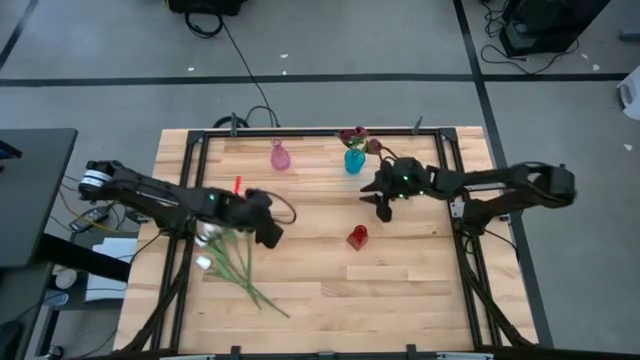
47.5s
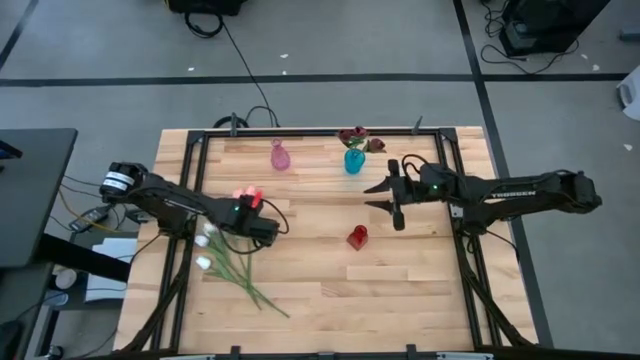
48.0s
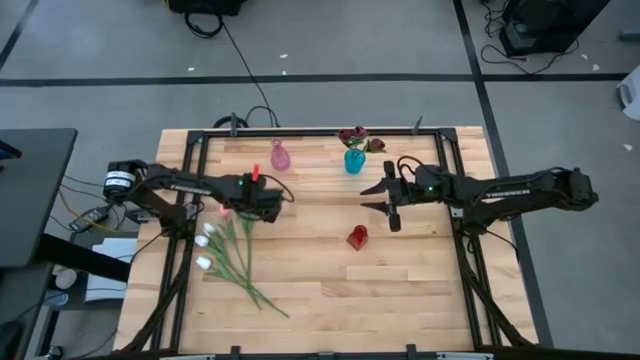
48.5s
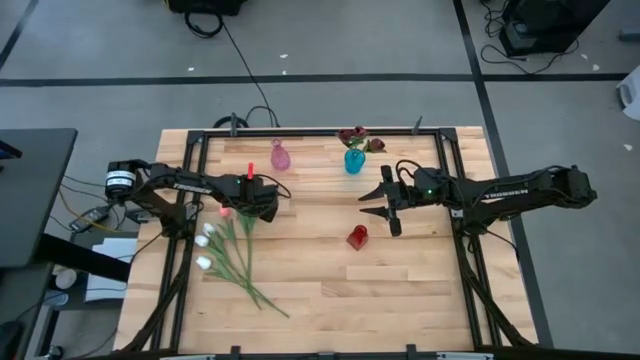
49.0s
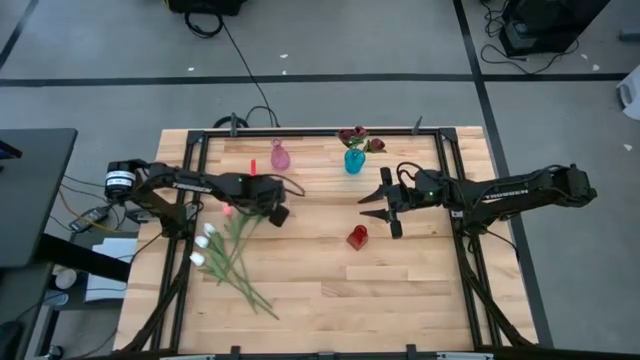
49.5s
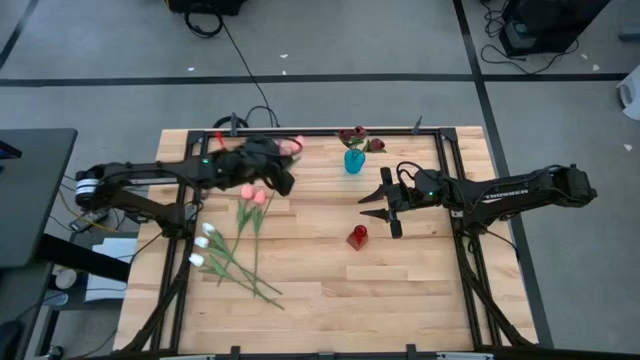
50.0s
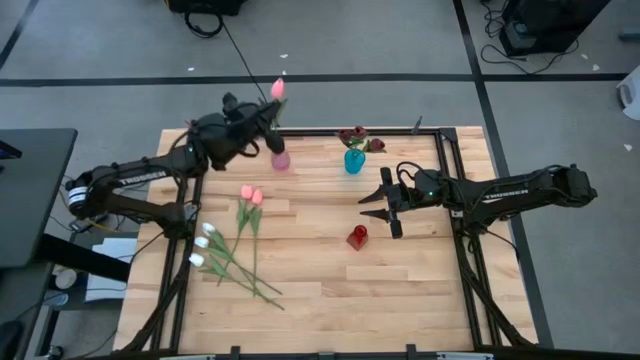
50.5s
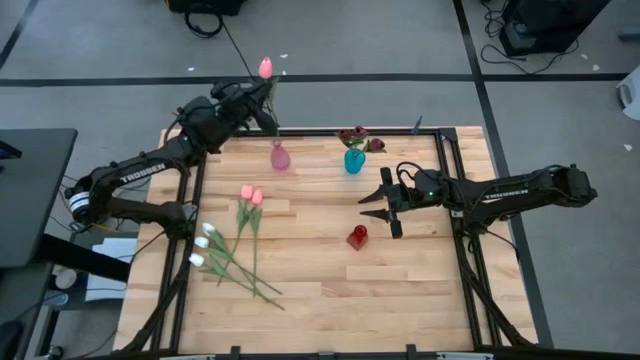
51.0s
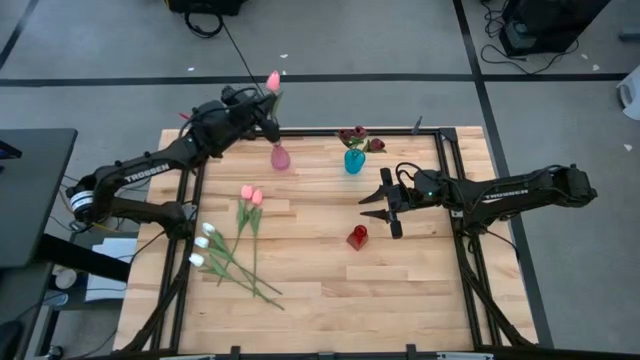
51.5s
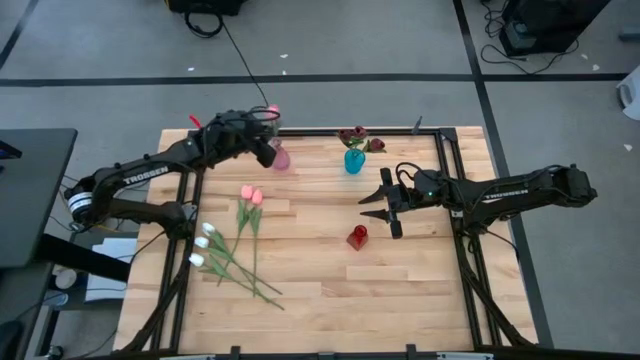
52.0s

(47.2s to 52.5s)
Task: Sort flowers into vase by color
Put the right pink tulip into the purple vase

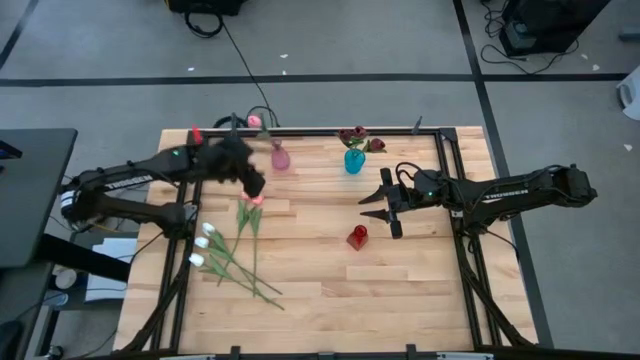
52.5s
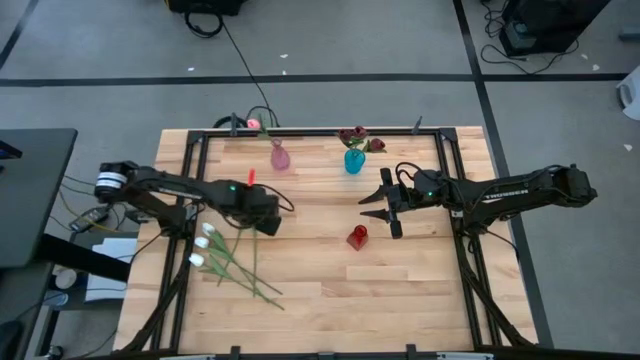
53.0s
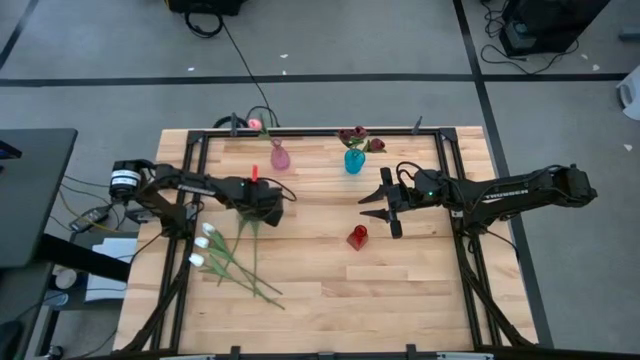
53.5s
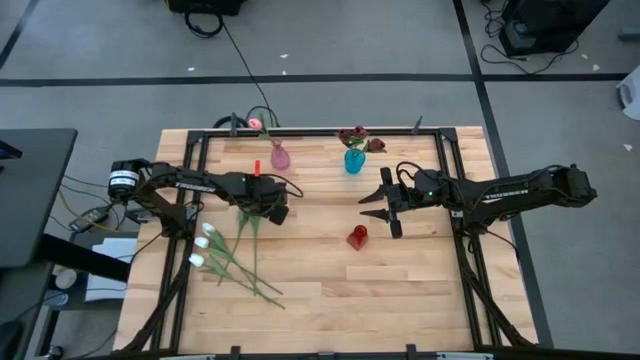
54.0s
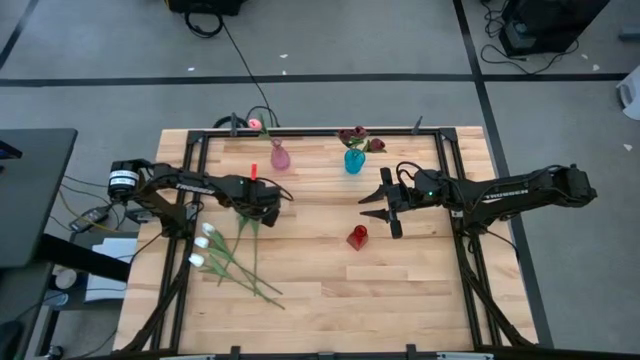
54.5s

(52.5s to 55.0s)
Put the right pink tulip into the purple vase

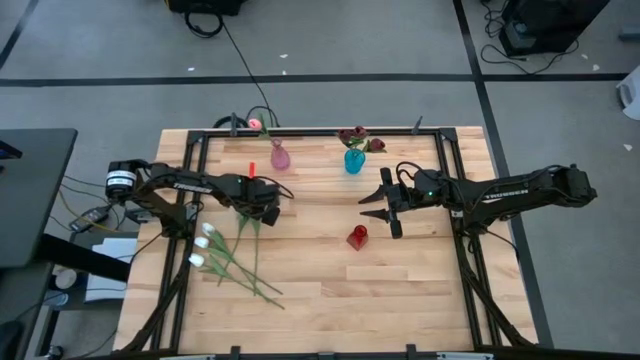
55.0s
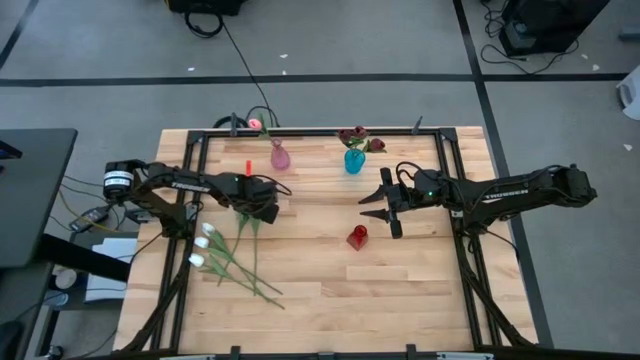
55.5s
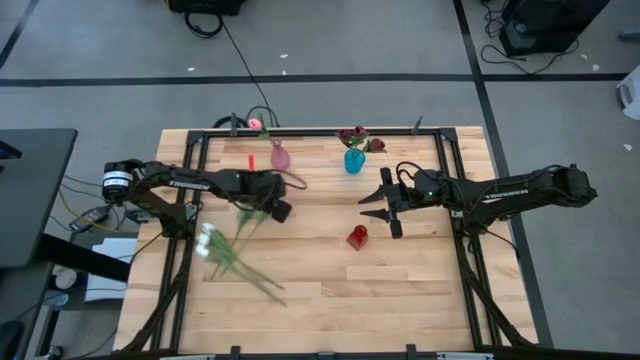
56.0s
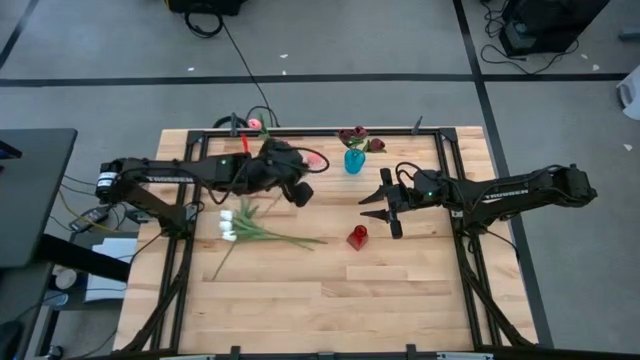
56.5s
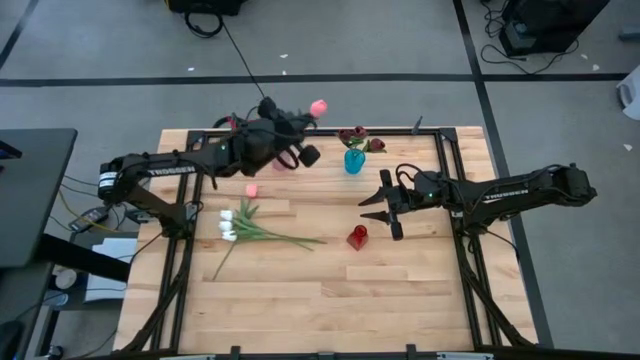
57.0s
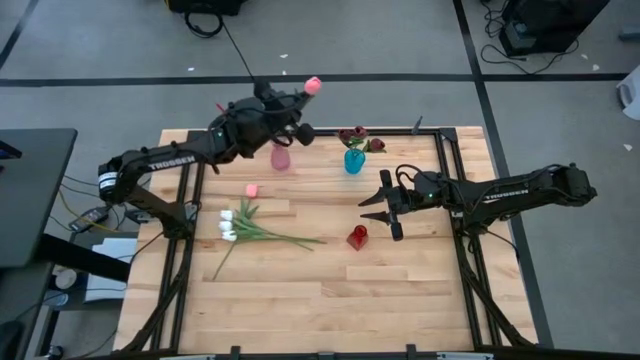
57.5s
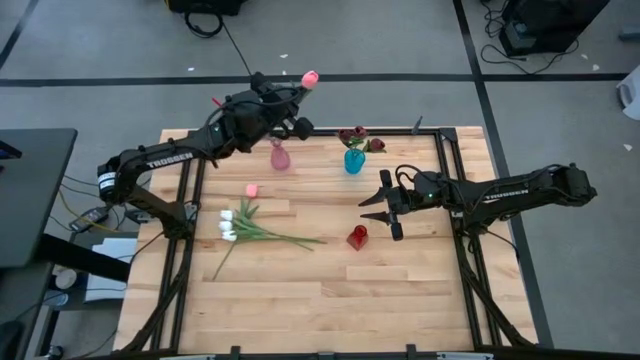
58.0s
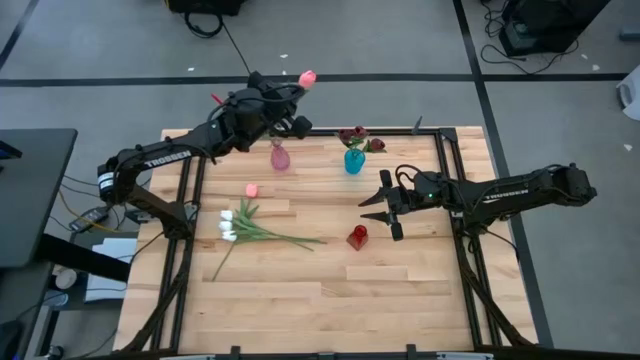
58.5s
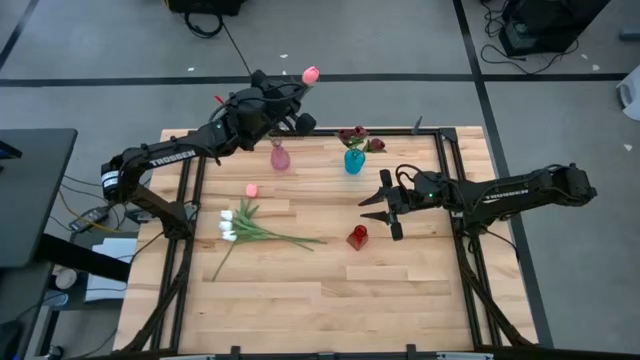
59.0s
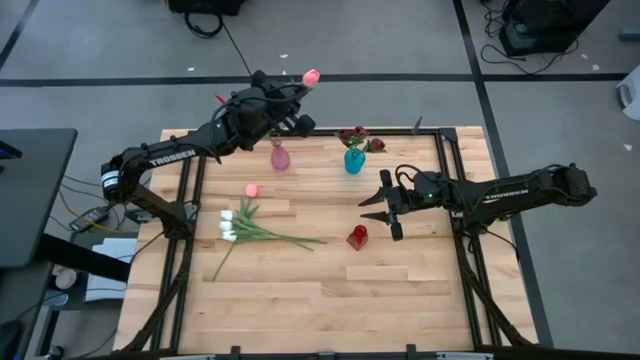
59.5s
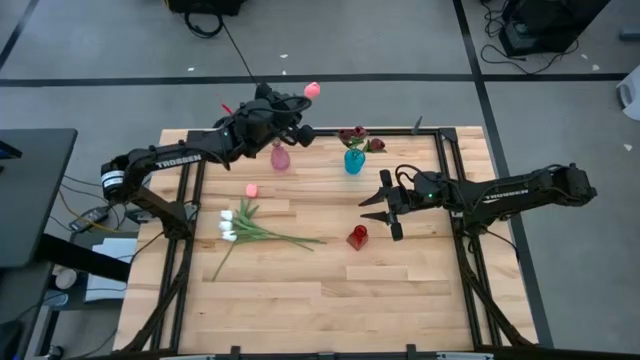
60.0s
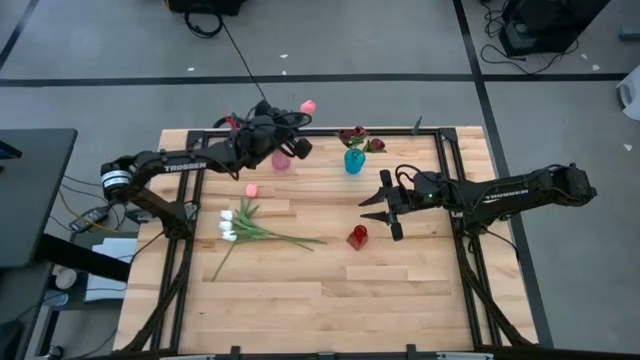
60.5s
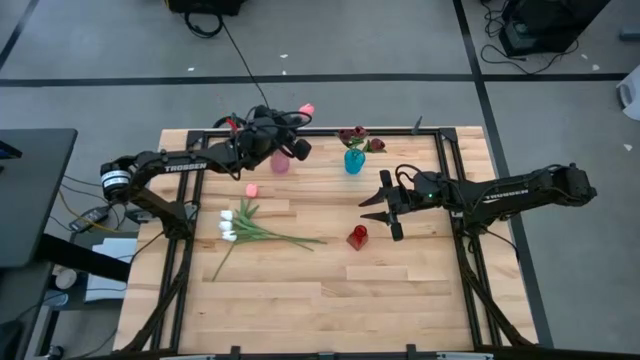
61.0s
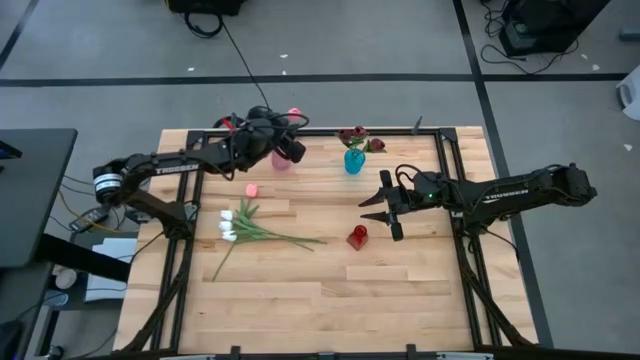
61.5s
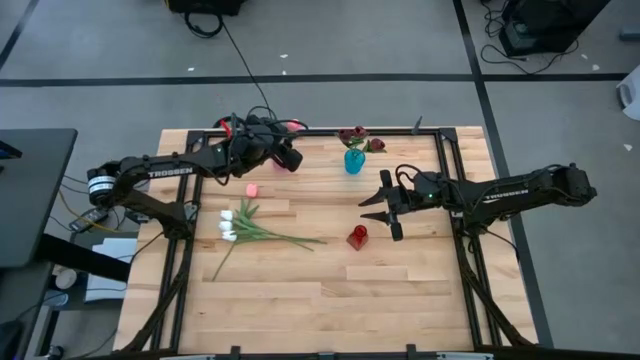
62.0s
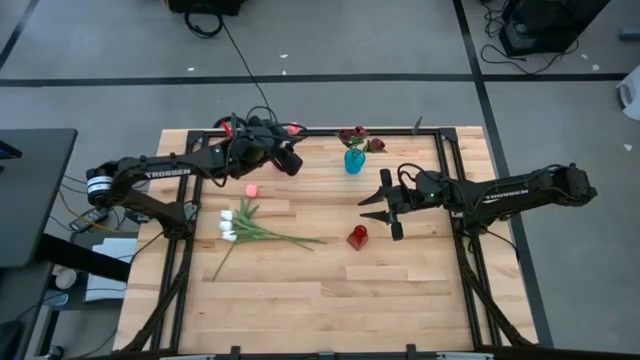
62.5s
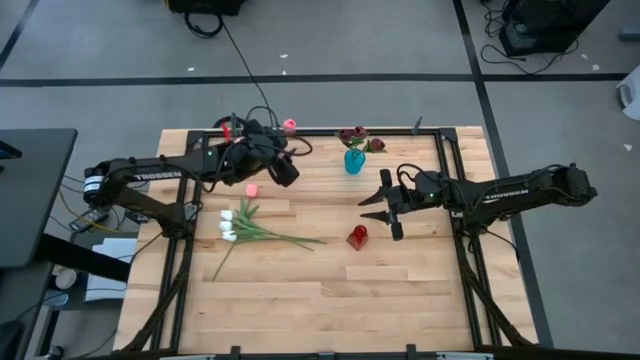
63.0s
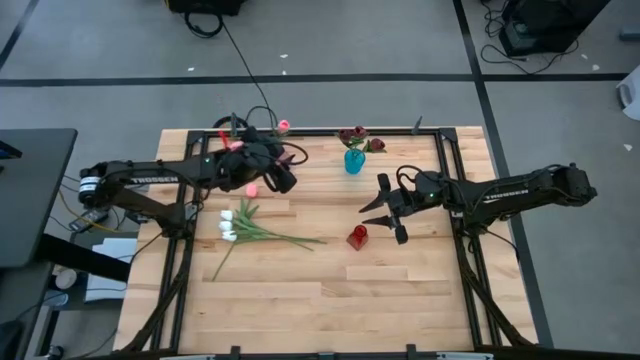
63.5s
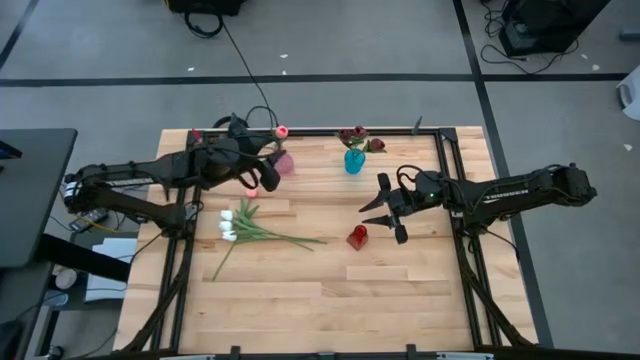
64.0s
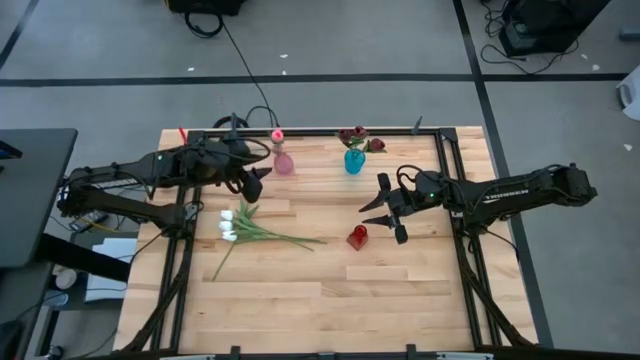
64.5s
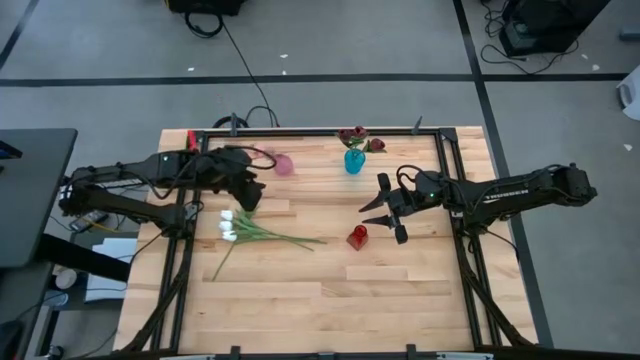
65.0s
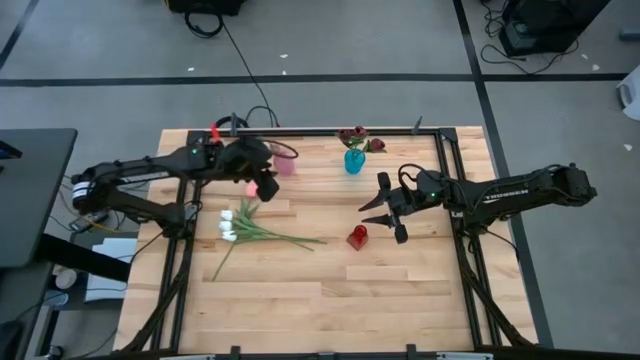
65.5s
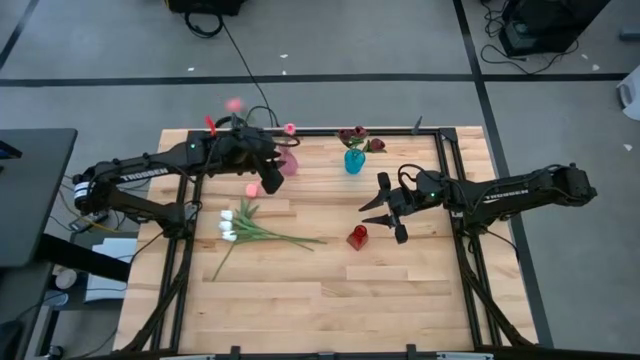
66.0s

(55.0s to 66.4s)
Put the right pink tulip into the purple vase

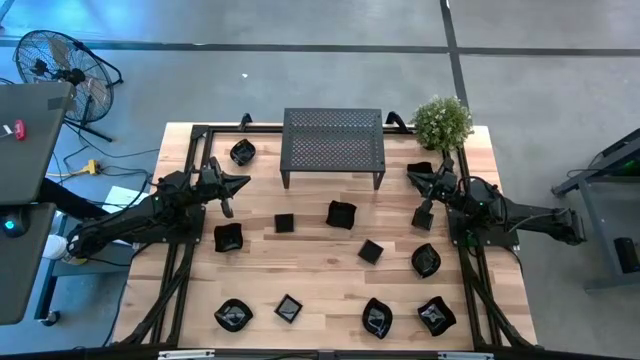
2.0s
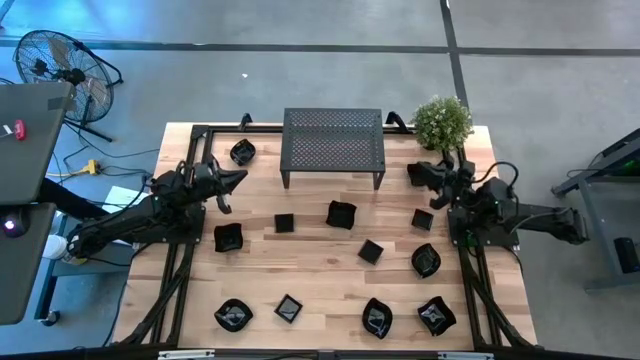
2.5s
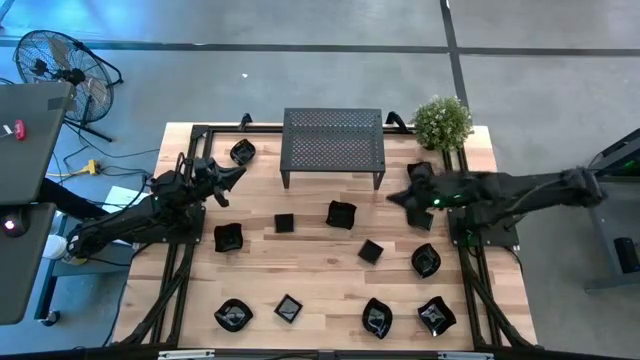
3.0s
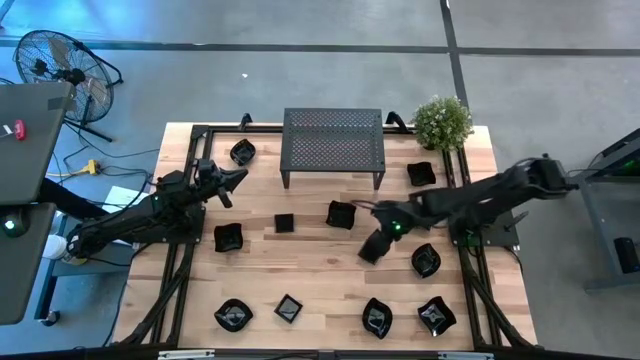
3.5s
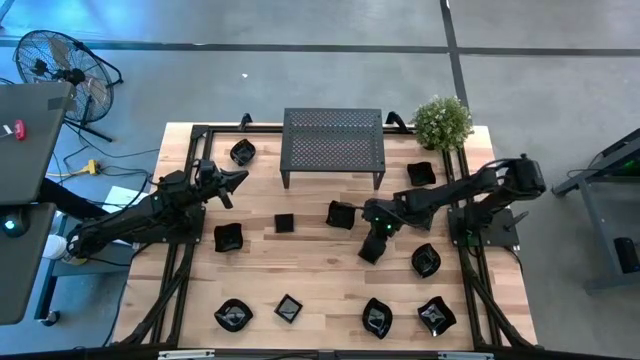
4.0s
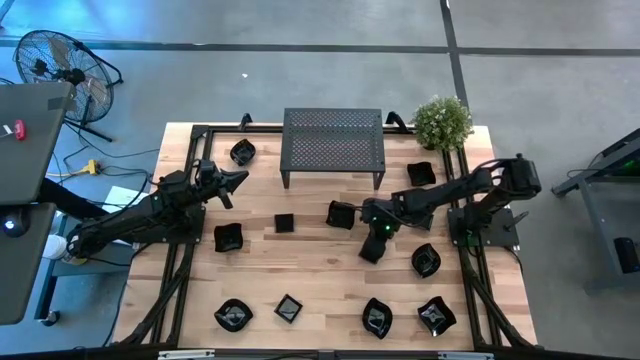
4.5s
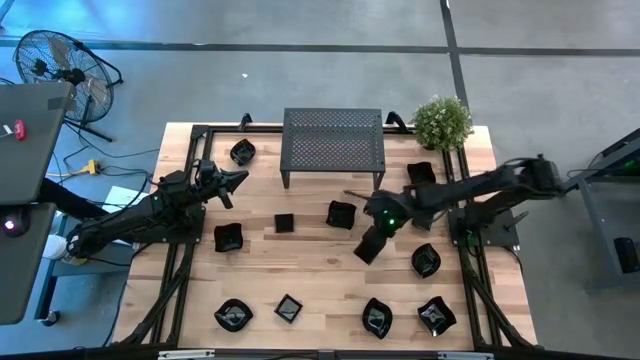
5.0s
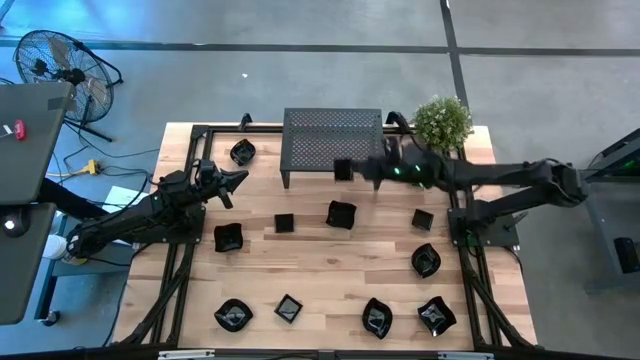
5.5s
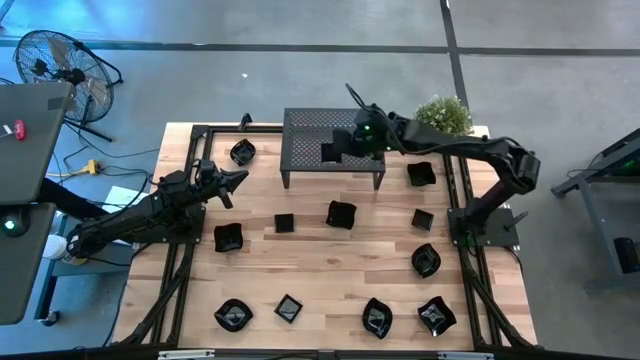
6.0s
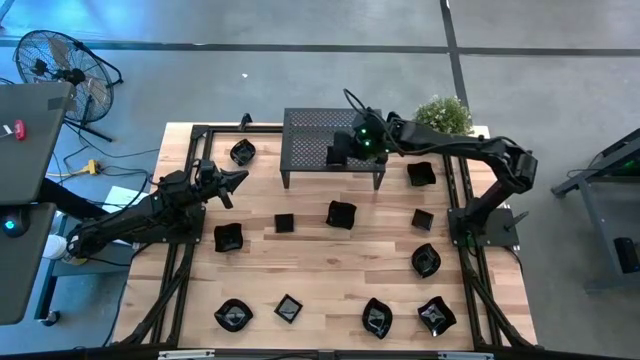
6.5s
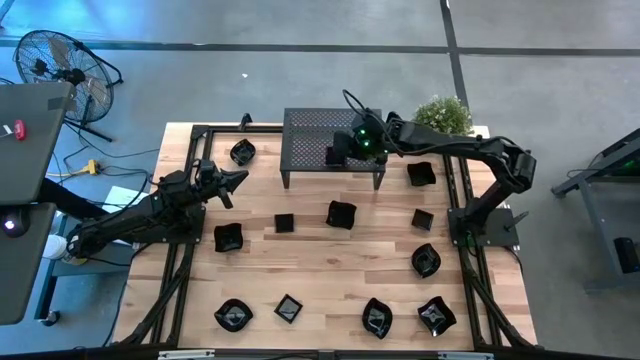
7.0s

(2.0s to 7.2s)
Task: Pick & Place Mini shaped plates
Put the black square plate on the shelf
